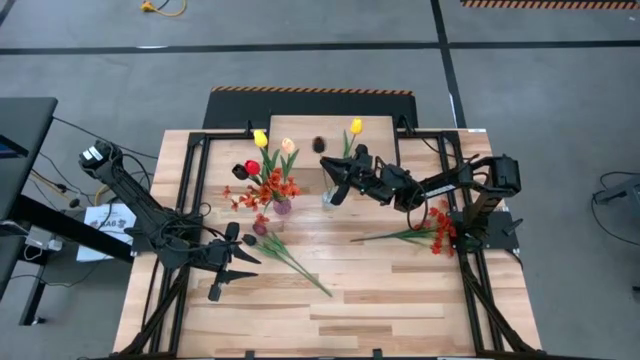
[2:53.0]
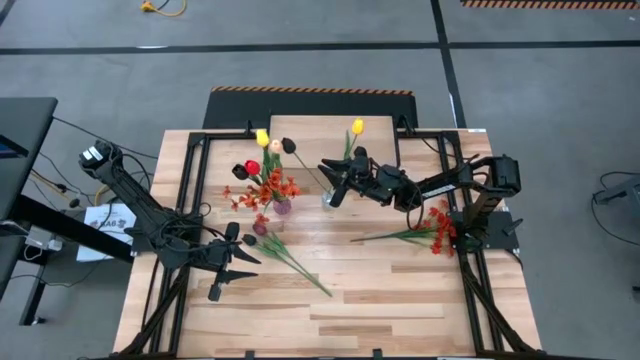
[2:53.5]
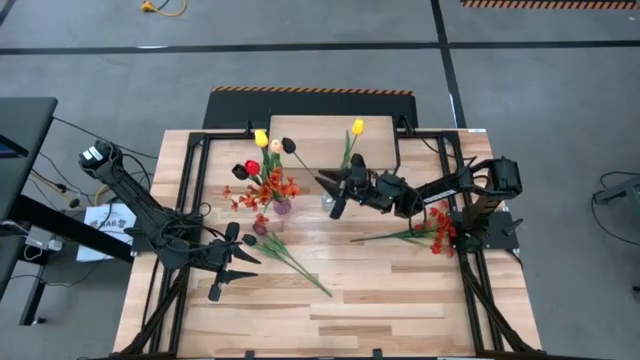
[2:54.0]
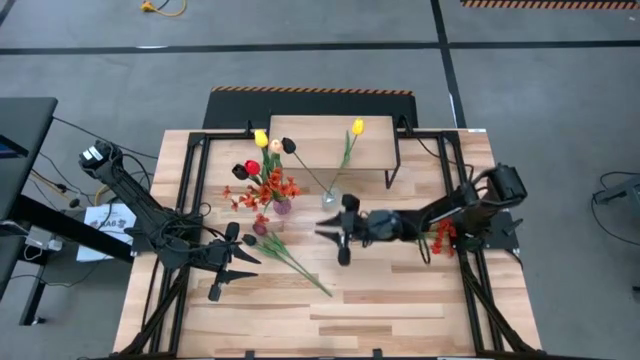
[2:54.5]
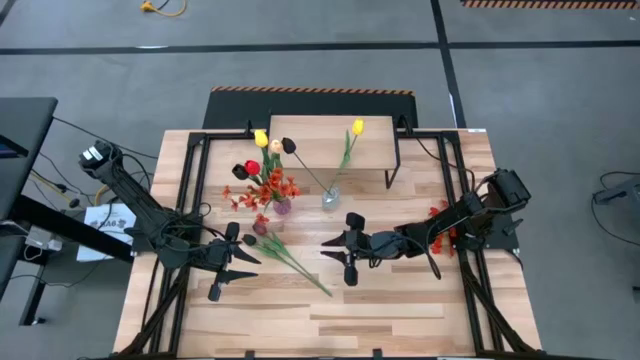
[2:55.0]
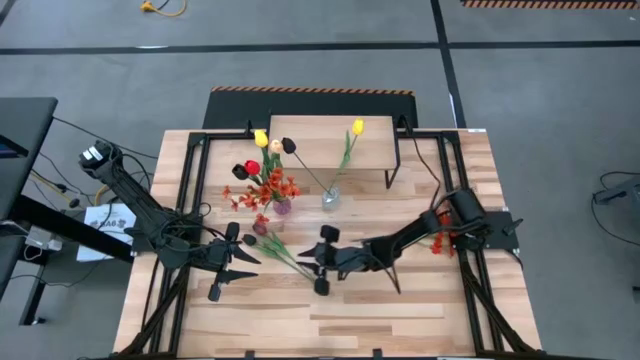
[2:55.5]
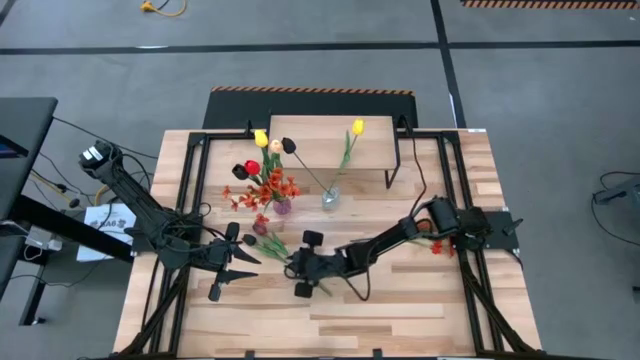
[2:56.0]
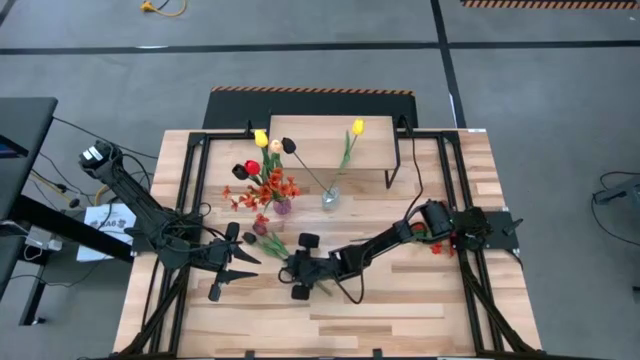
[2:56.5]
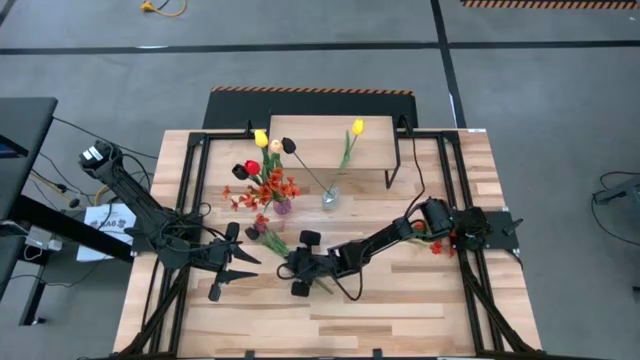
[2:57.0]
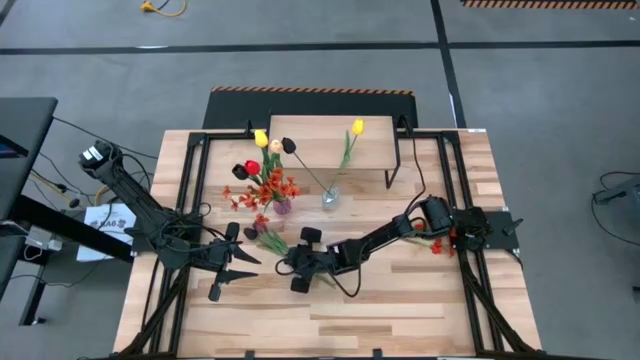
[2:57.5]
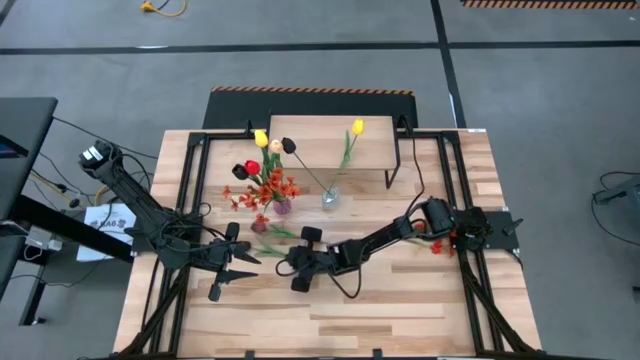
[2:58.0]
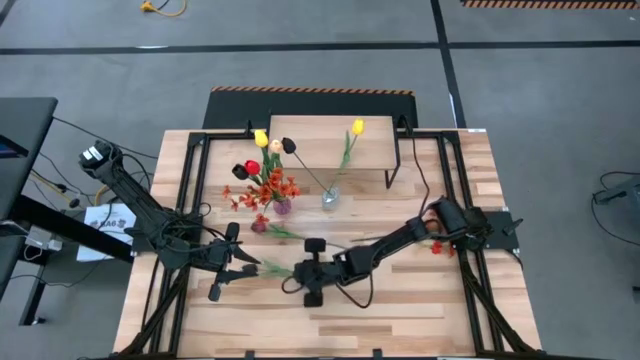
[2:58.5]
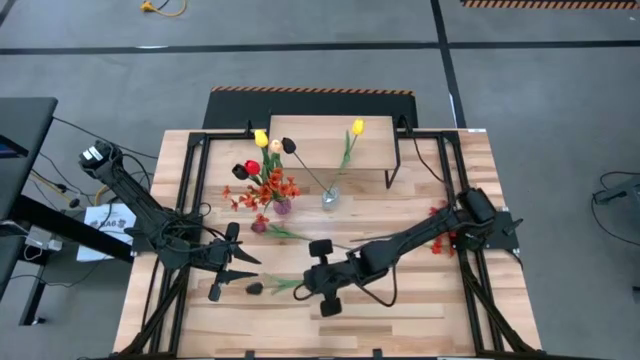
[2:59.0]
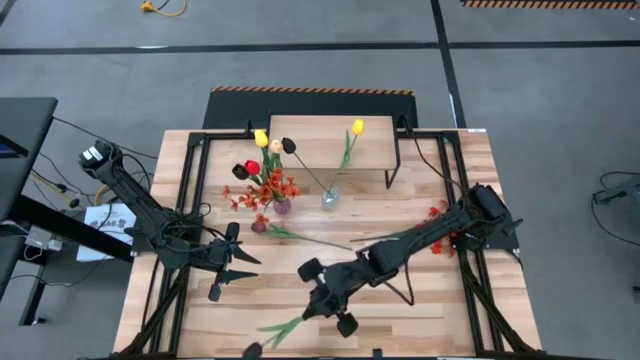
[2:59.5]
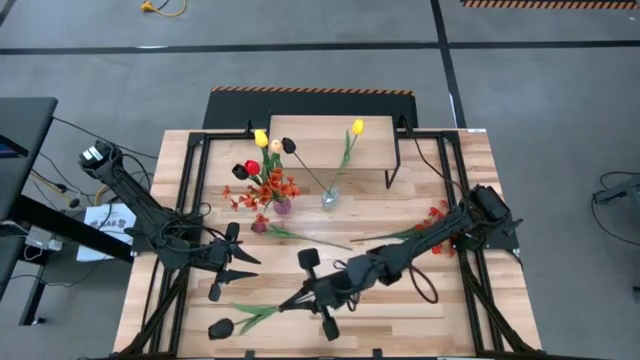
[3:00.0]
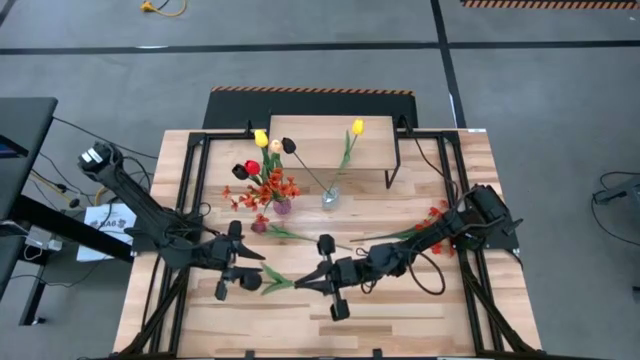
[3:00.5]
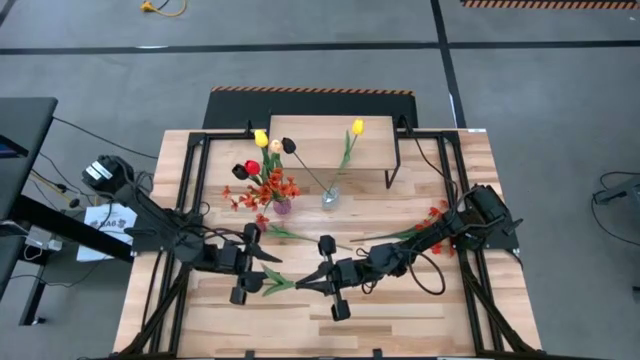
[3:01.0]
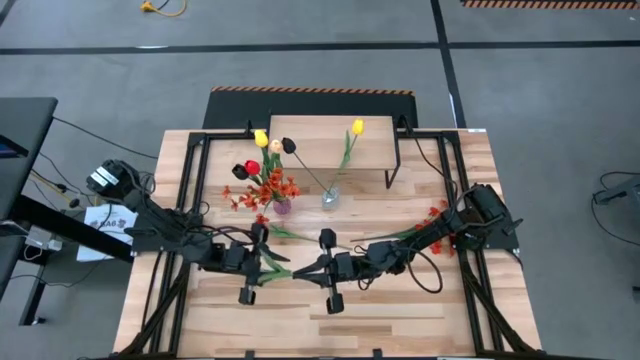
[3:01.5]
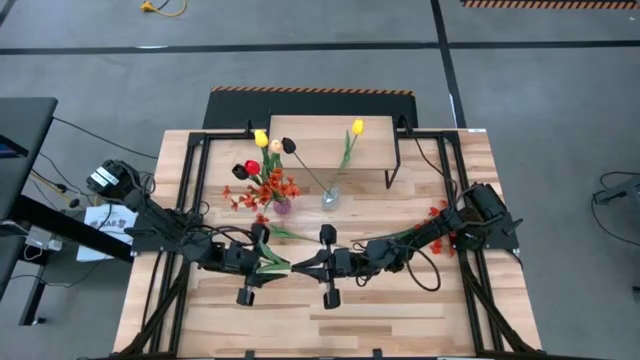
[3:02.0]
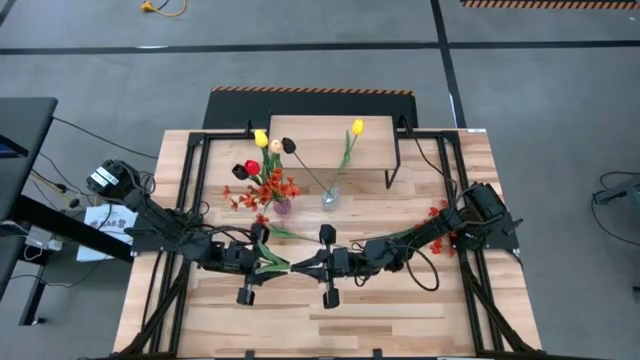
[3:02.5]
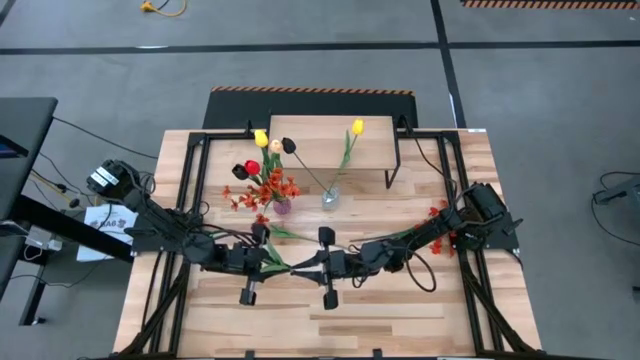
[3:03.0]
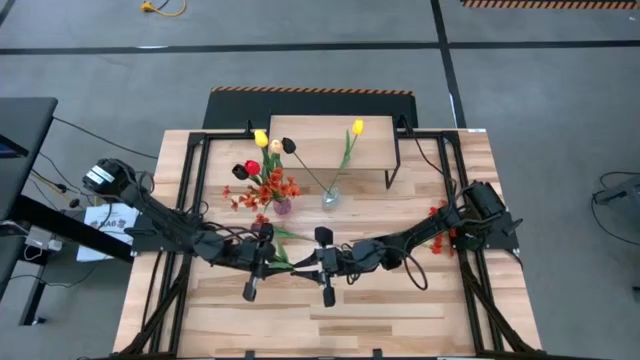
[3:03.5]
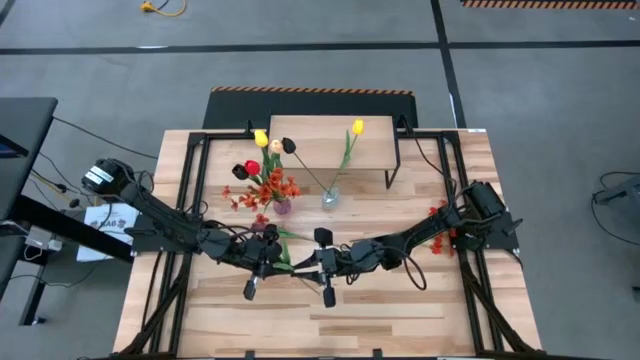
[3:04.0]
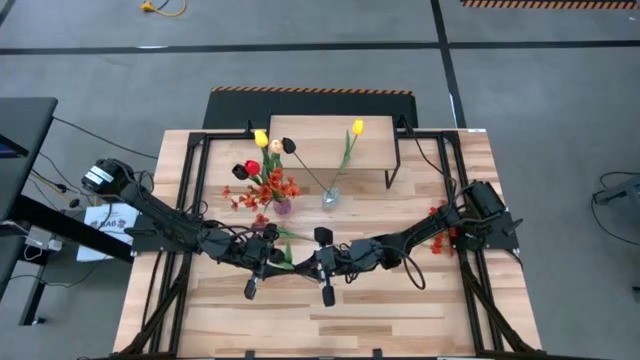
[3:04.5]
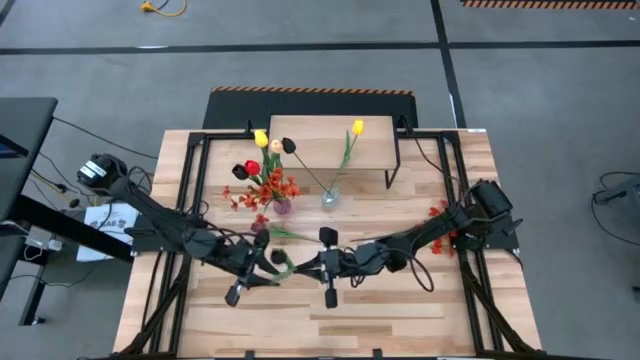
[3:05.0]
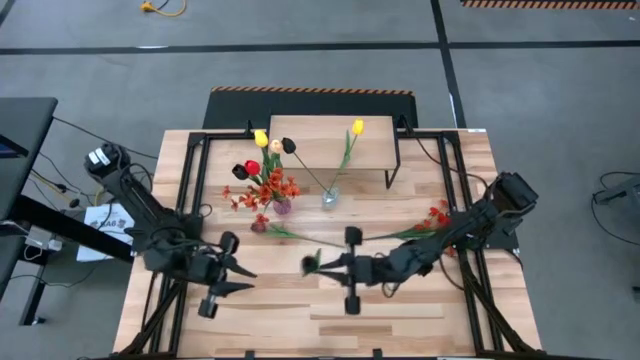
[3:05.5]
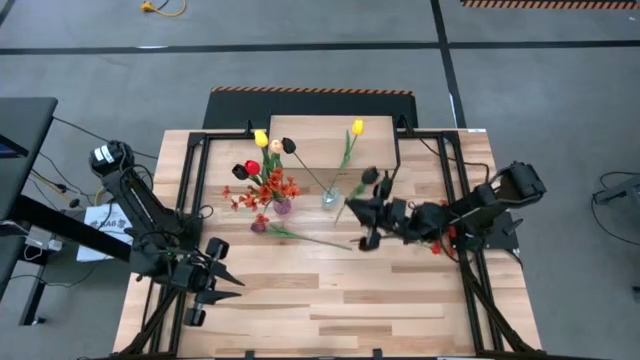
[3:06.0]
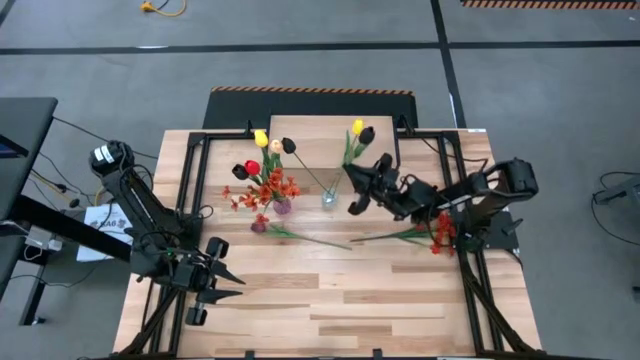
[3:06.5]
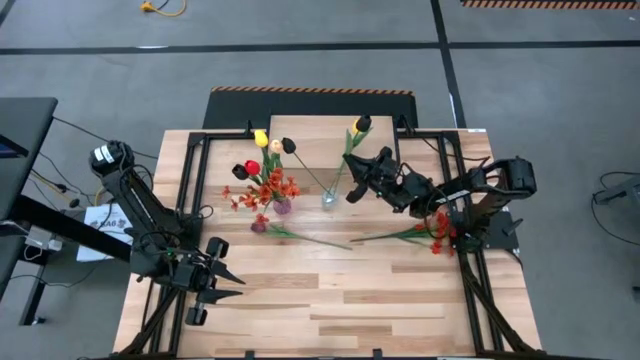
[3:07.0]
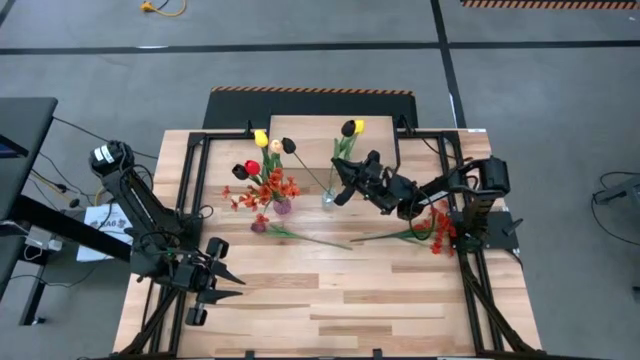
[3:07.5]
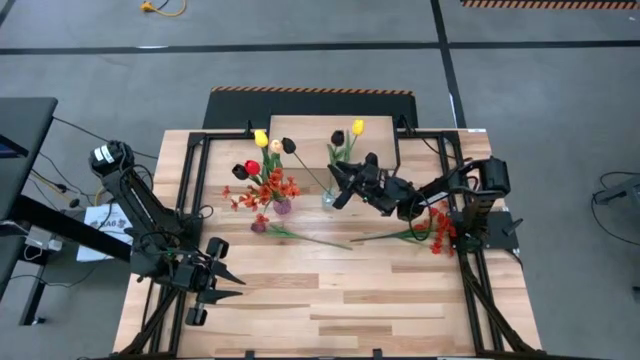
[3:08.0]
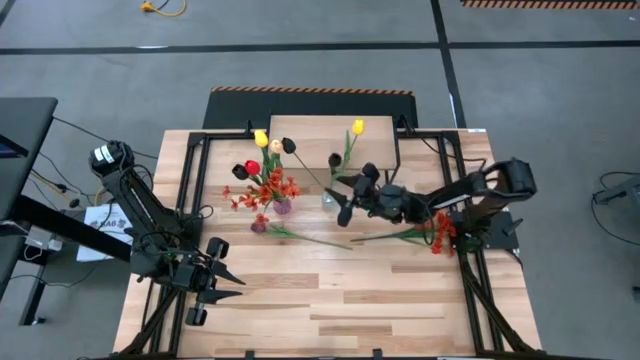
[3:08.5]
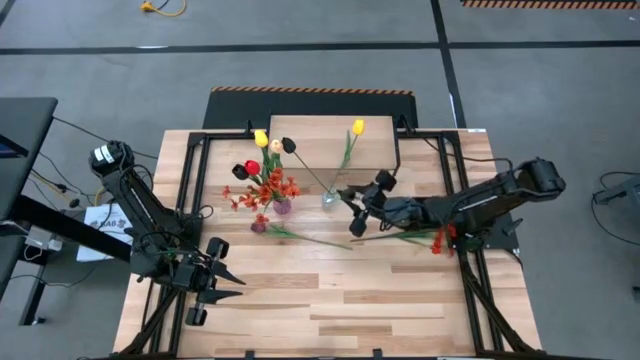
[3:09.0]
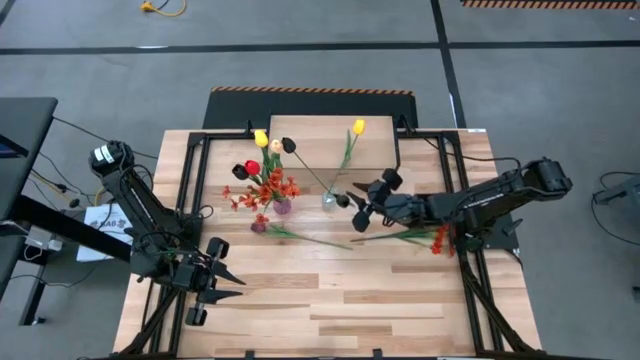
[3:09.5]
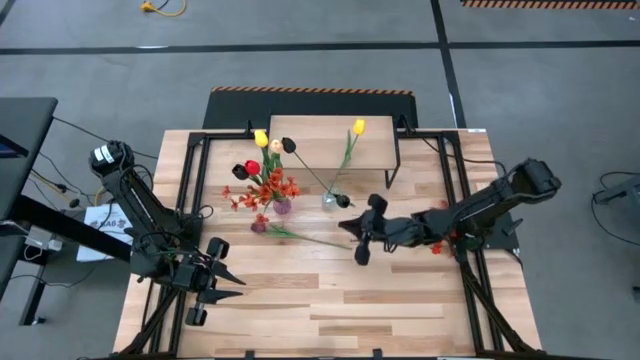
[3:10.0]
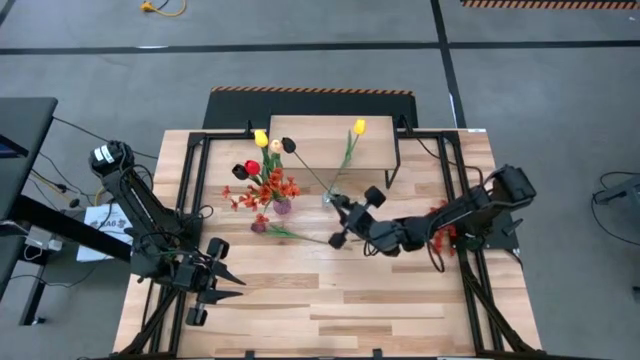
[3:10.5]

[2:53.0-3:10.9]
Task: Pick and place flowers into a vace then onto a shelf
Put the black tulip into the transparent vase
